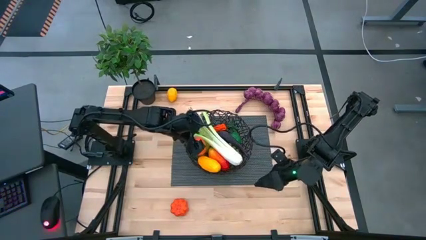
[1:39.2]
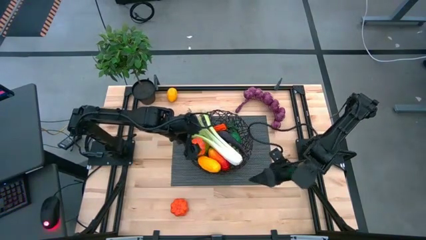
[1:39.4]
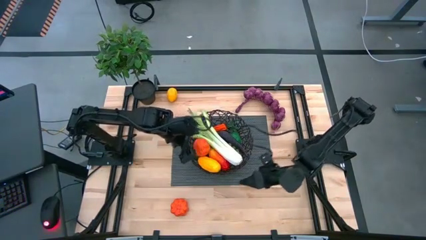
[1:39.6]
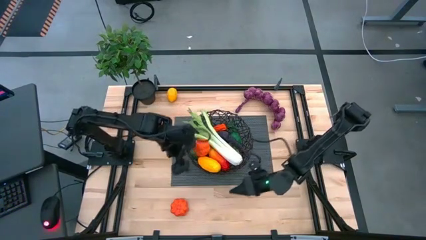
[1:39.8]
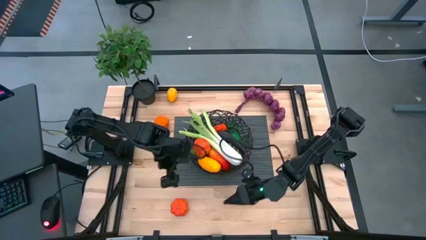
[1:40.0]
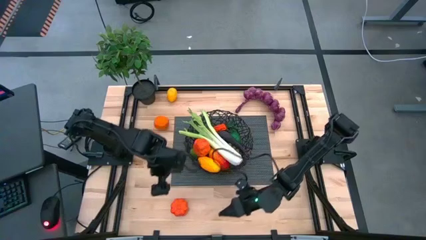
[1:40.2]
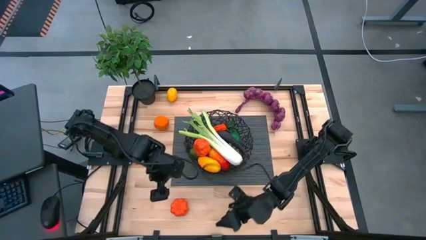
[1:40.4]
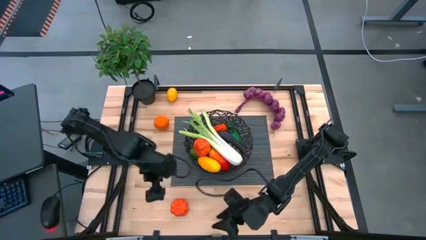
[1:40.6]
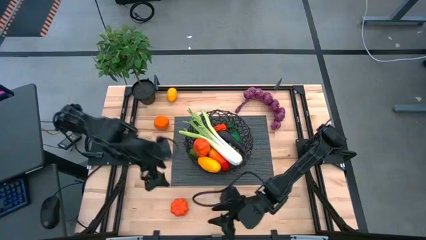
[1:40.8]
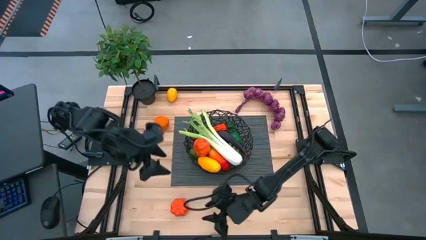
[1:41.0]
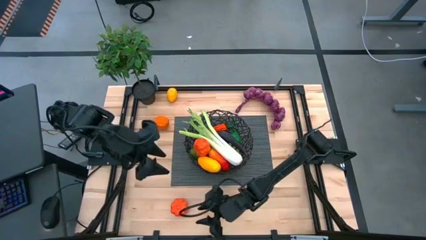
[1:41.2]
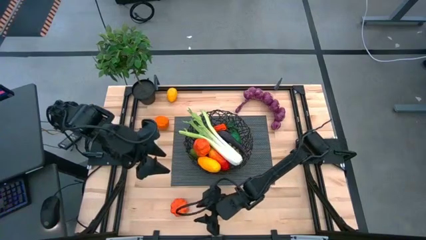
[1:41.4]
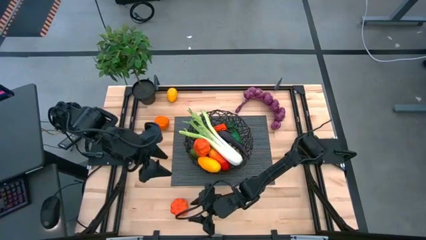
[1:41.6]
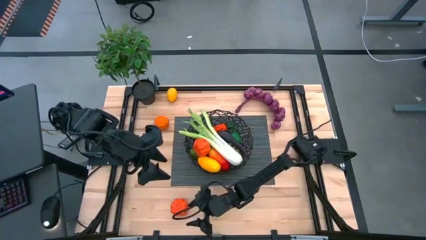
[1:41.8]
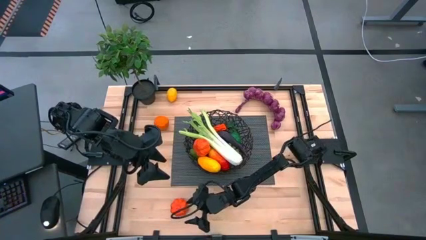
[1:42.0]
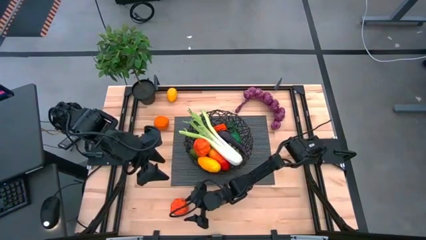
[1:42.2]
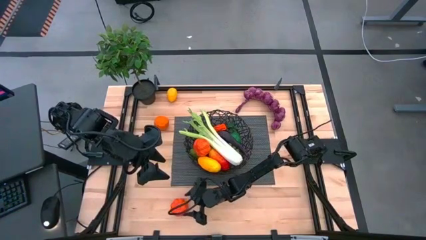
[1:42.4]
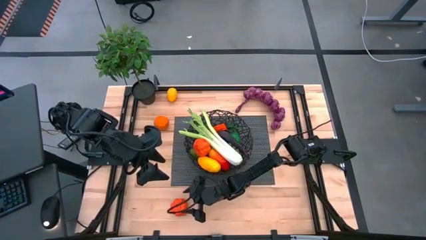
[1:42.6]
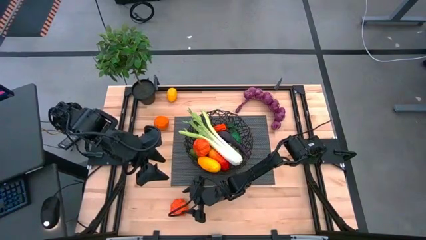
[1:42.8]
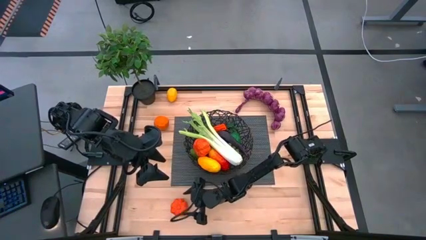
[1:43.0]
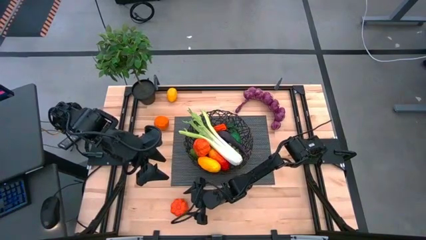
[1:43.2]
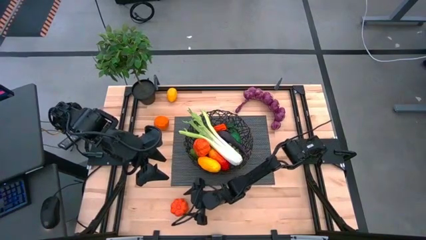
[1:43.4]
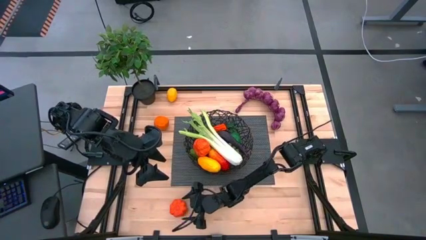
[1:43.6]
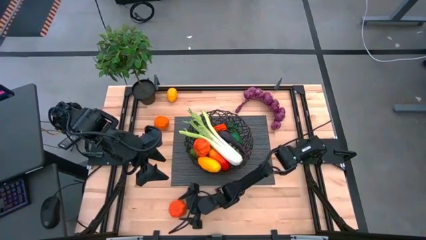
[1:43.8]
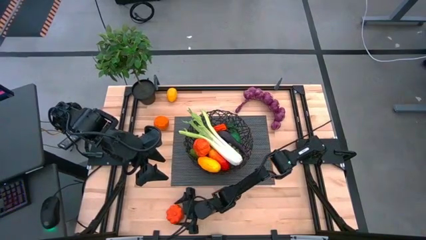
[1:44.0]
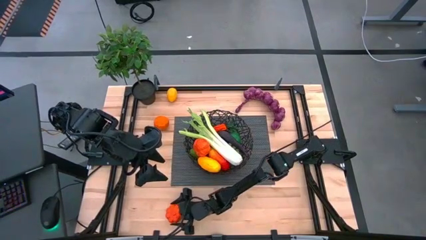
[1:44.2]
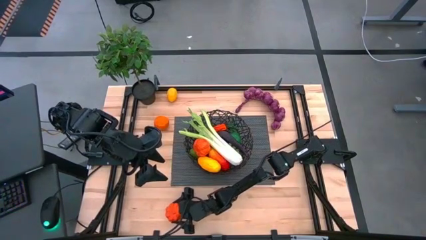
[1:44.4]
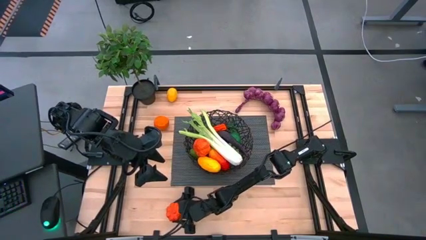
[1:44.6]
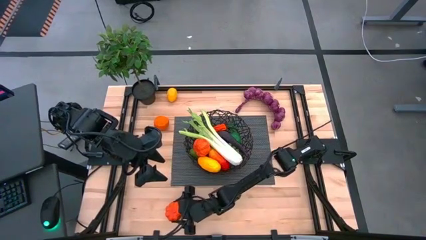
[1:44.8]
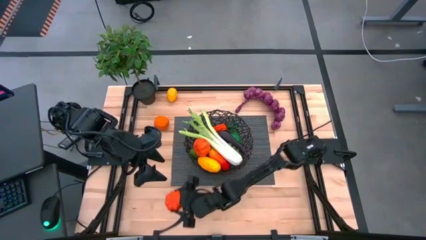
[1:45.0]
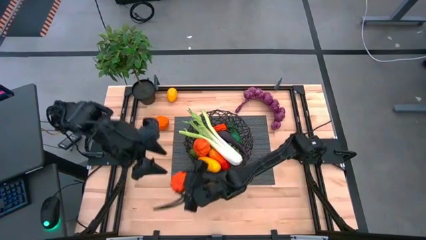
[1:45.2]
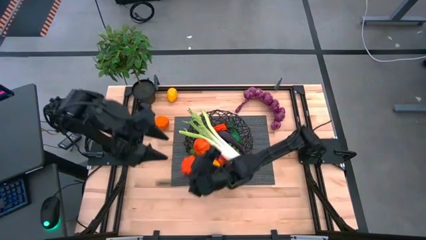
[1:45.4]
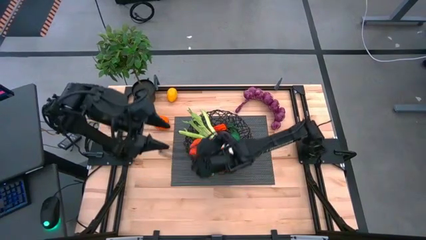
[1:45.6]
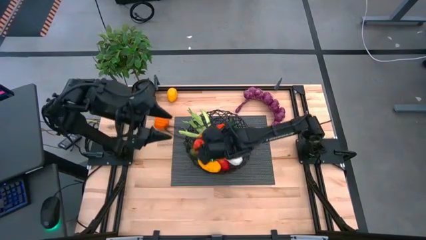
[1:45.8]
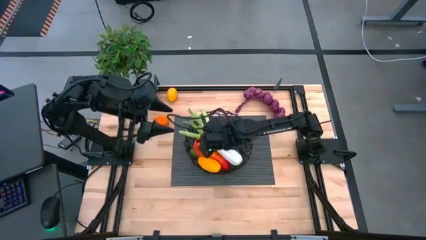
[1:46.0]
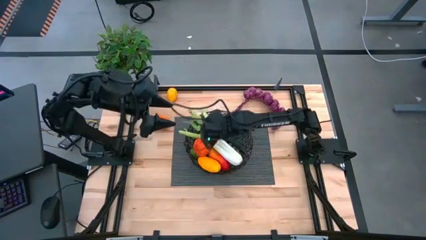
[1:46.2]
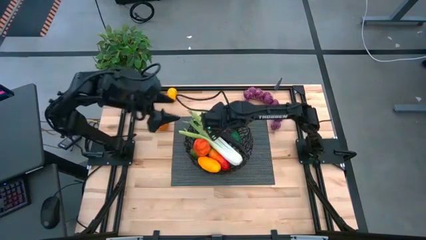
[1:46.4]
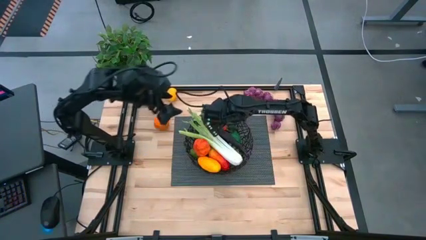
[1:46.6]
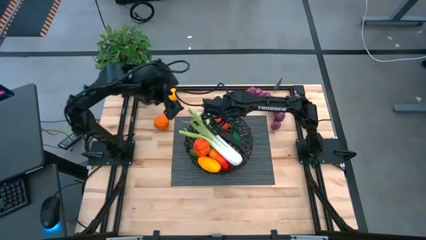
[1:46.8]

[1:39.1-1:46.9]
Task: Build produce basket
Put the pumpkin into the black basket

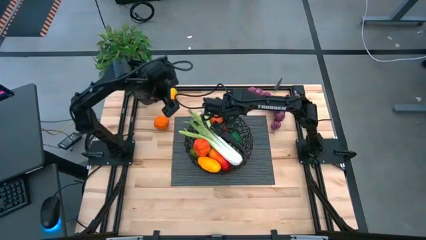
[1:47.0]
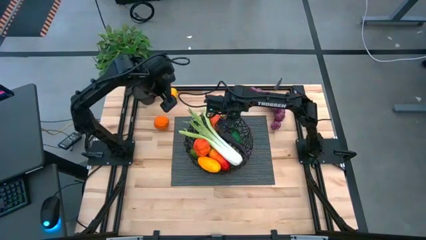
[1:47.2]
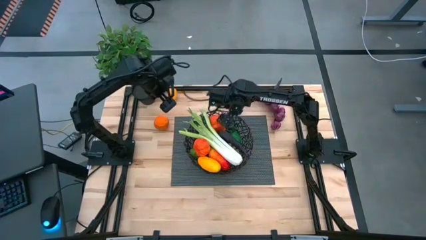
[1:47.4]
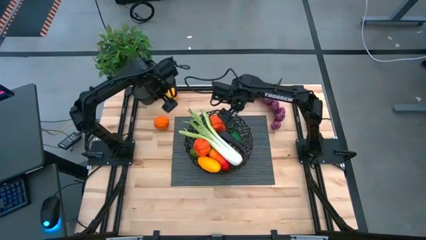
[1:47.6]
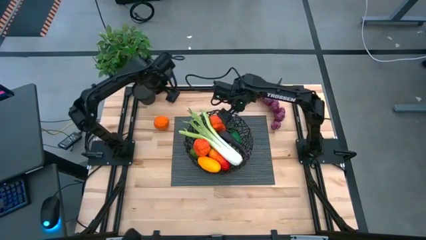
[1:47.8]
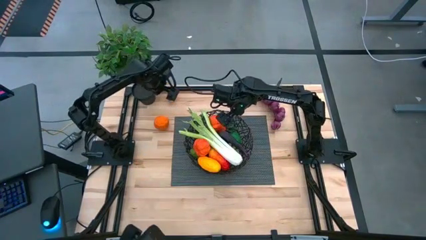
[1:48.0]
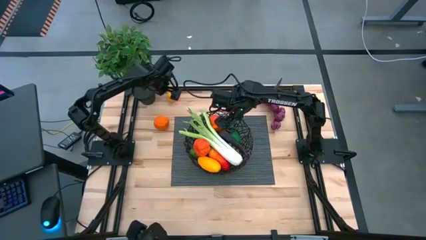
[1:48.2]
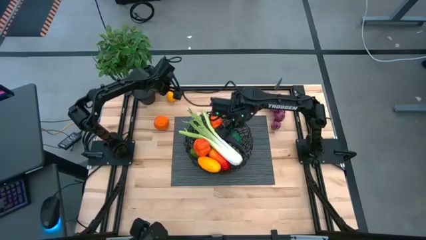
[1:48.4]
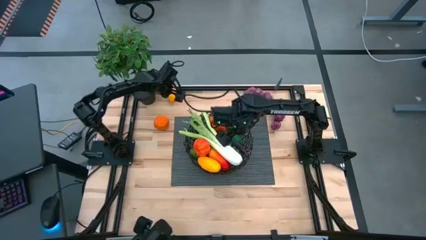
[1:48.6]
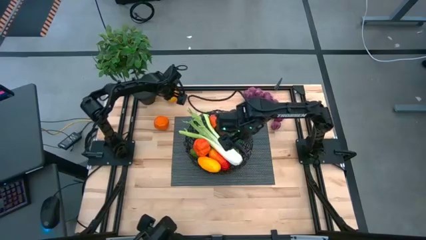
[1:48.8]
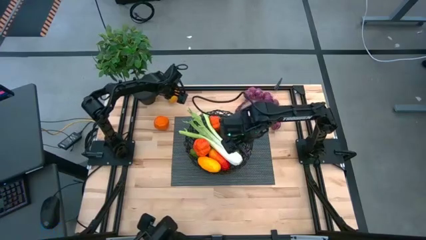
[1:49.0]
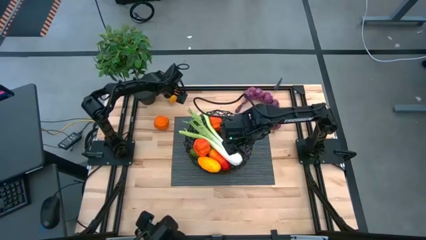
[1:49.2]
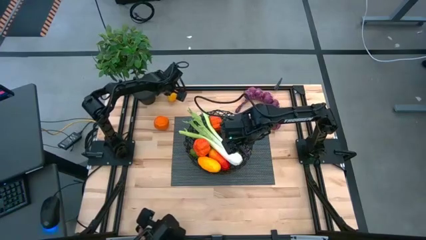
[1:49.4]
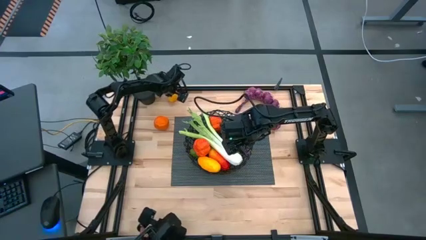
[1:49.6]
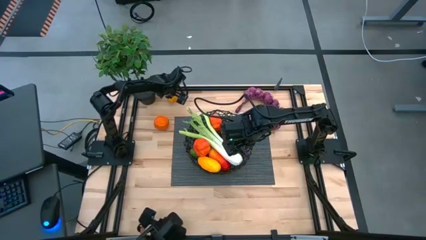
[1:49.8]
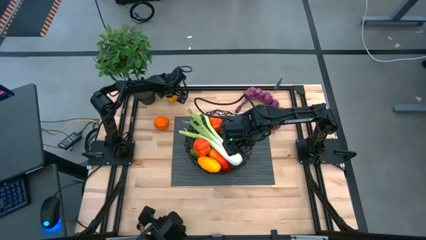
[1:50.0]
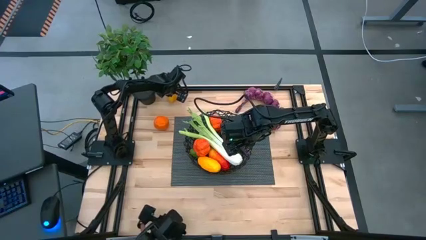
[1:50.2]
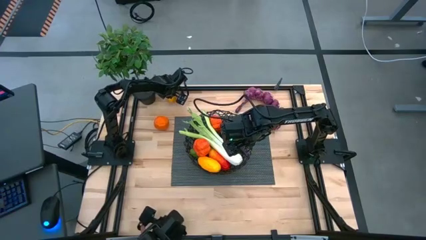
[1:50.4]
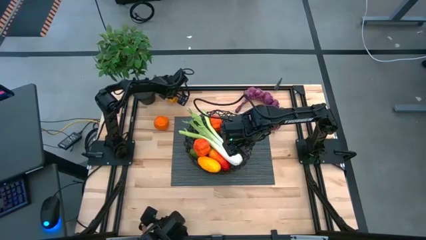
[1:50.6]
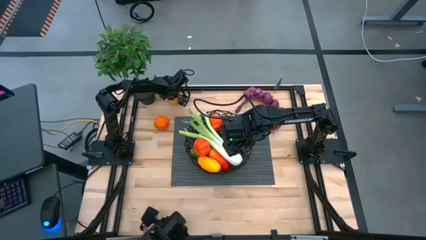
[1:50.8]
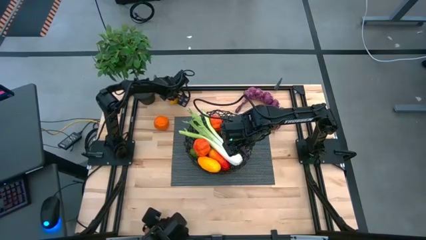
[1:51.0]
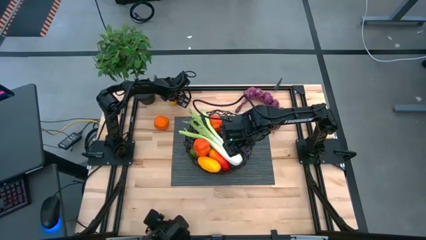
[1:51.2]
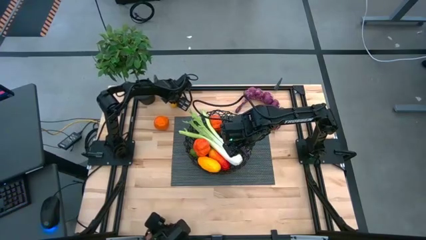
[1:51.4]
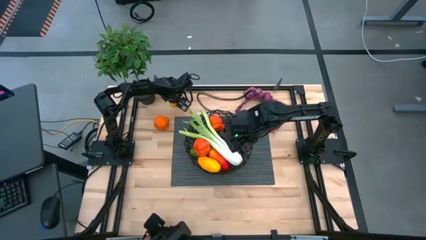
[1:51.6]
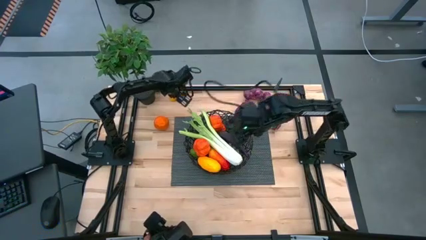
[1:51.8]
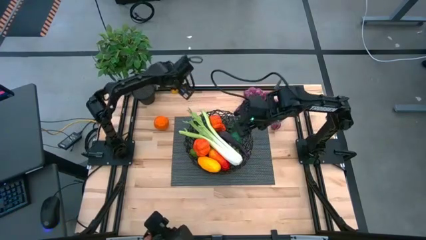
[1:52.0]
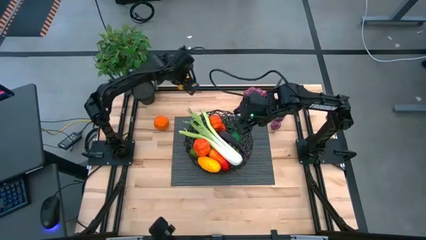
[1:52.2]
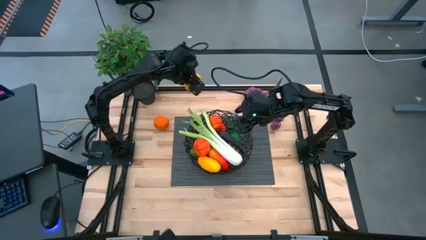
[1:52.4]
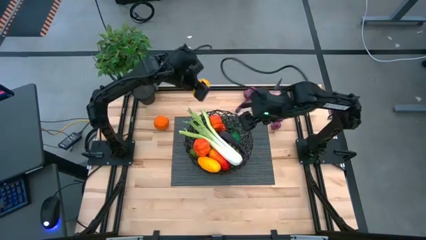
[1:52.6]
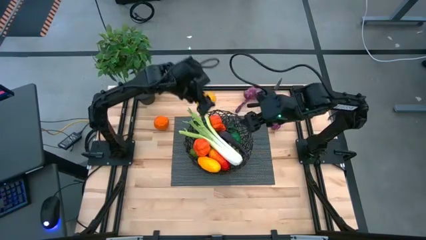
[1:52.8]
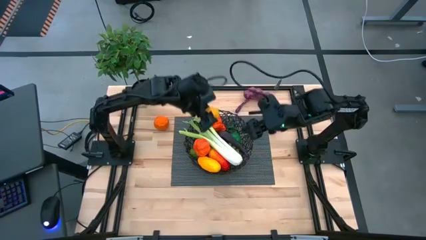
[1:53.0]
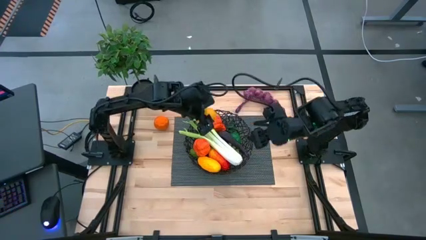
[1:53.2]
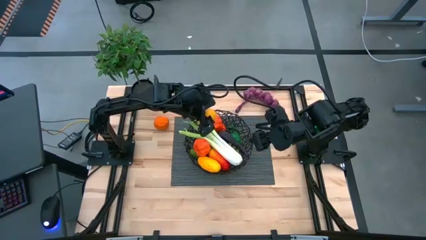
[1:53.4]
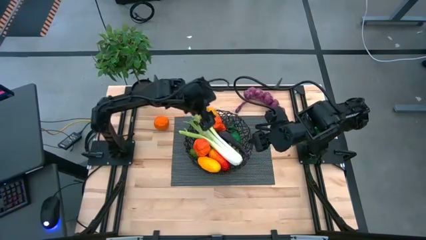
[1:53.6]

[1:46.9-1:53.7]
Put the lemon into the black basket

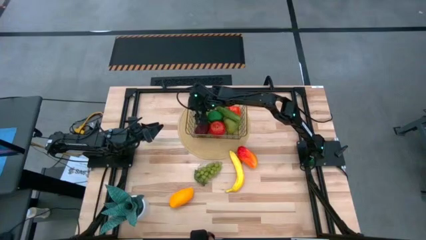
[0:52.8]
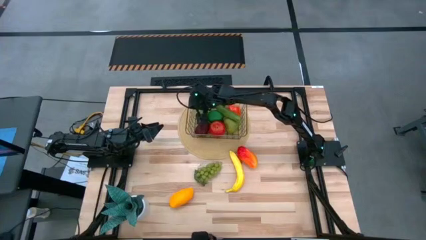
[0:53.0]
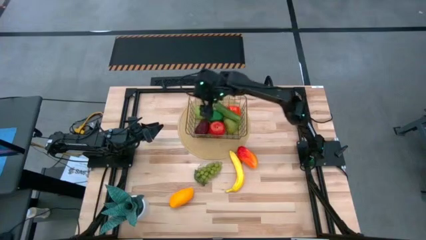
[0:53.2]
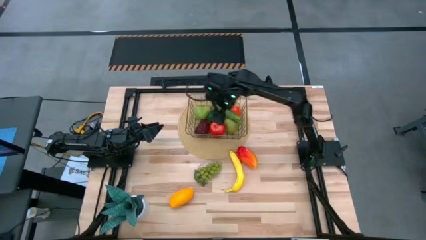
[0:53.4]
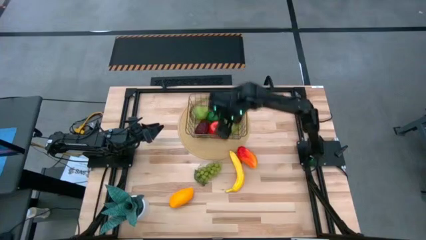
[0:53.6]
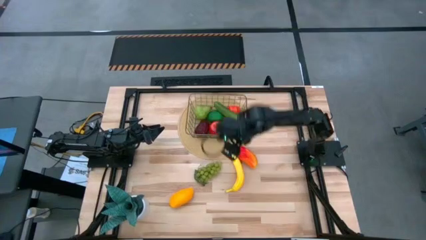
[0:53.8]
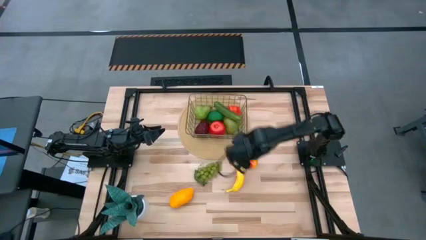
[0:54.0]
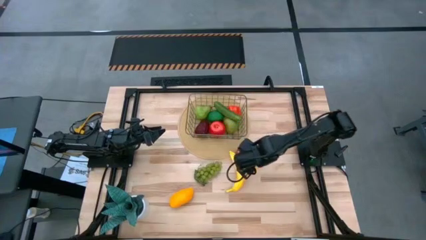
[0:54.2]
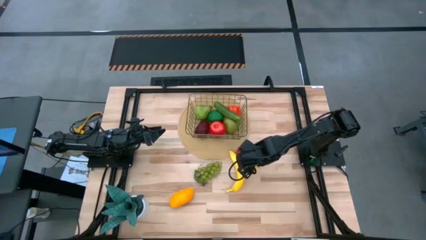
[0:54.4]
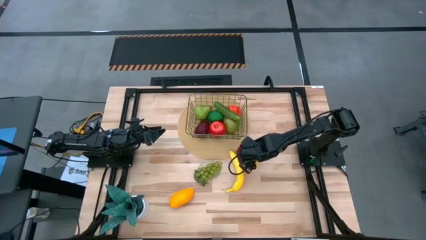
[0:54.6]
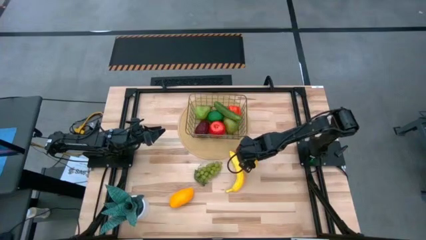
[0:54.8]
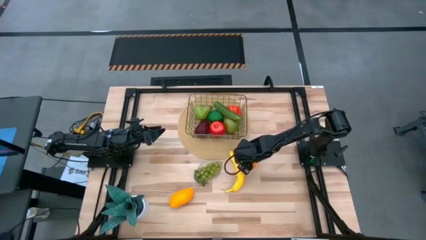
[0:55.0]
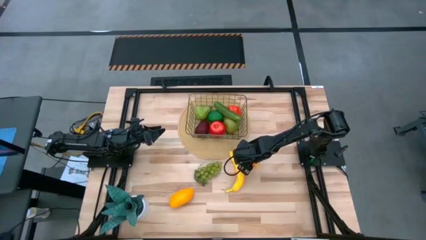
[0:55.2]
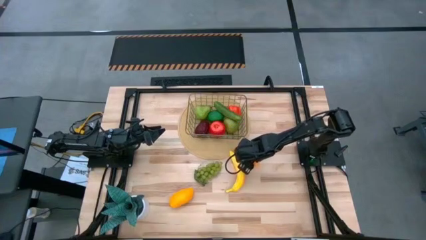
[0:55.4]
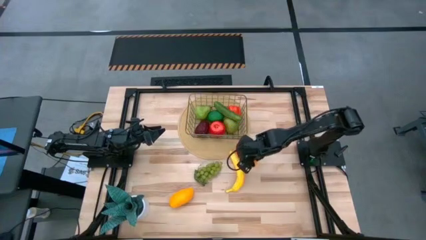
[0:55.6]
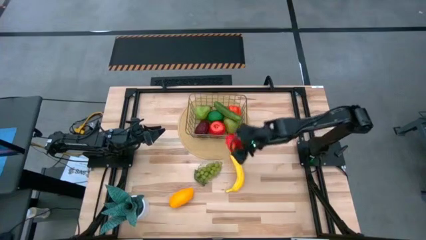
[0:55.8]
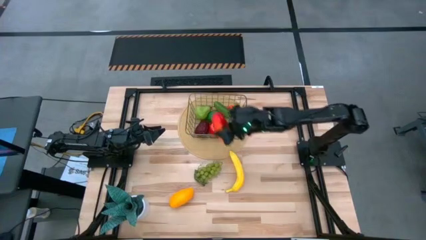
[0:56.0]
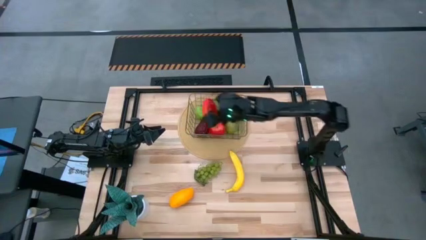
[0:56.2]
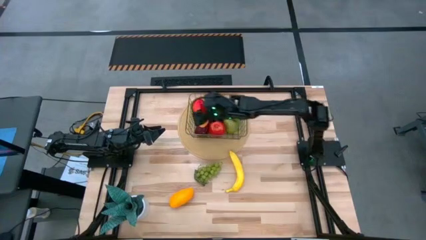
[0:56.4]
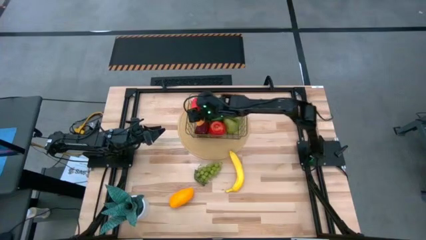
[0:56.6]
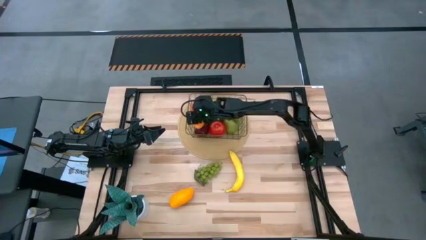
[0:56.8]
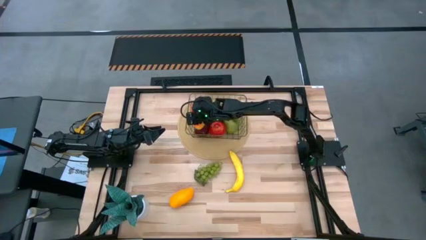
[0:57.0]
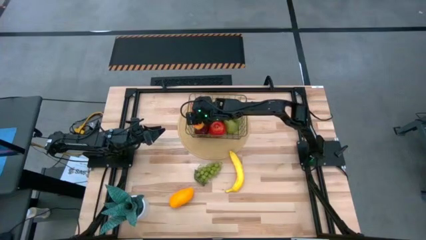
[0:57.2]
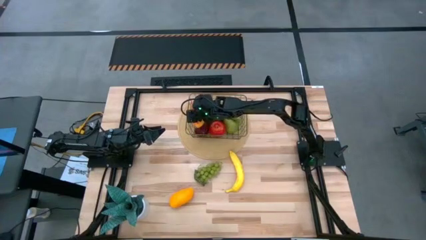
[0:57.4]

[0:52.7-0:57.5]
Task: Build produce basket
Put the orange mango into the wire basket
